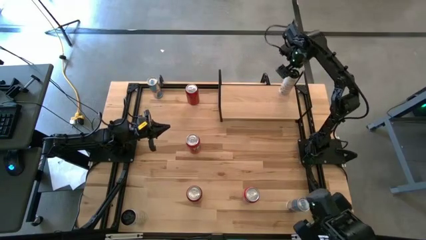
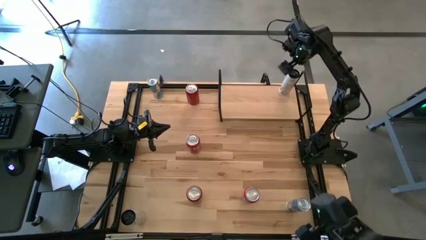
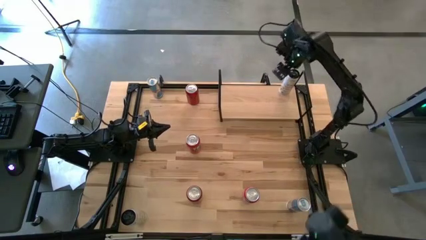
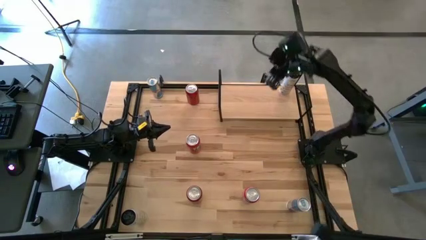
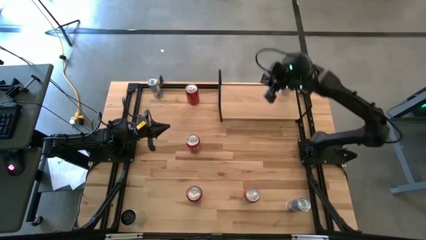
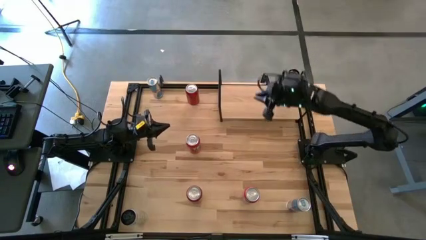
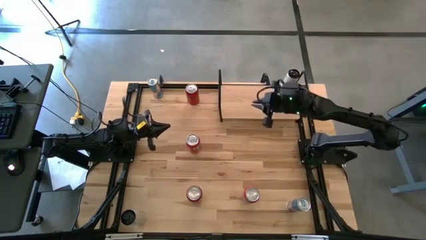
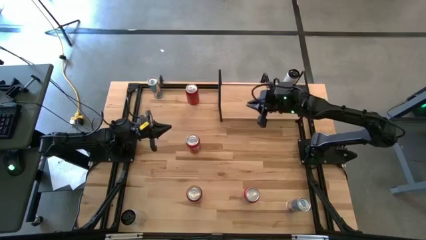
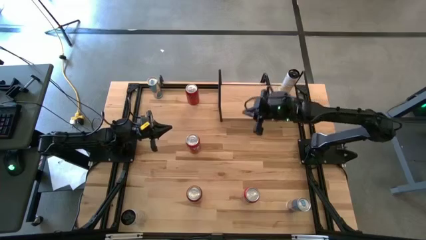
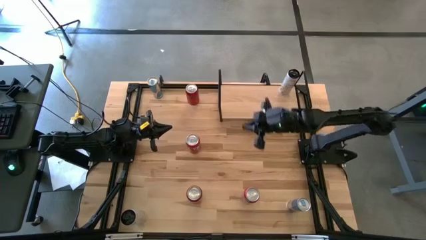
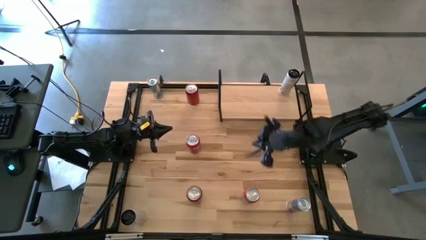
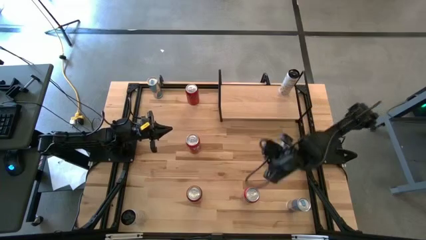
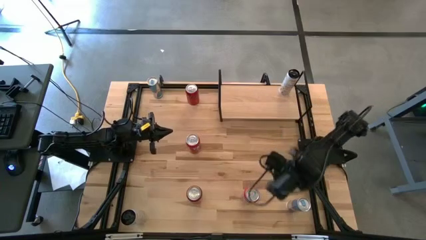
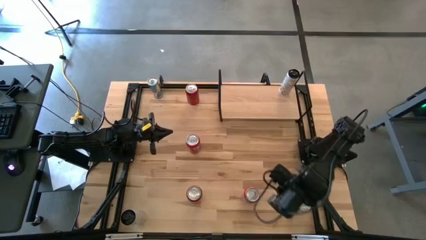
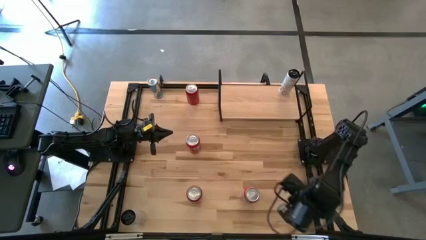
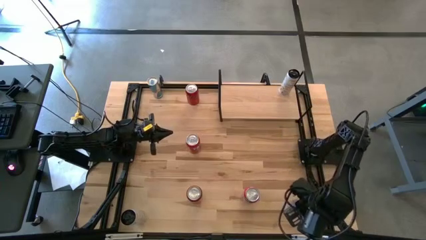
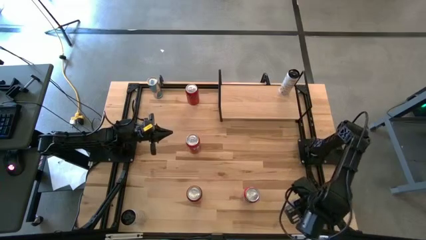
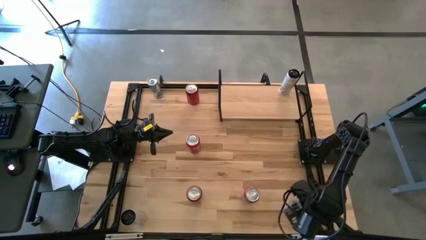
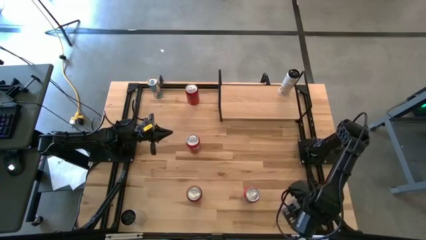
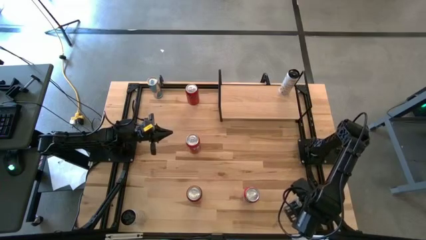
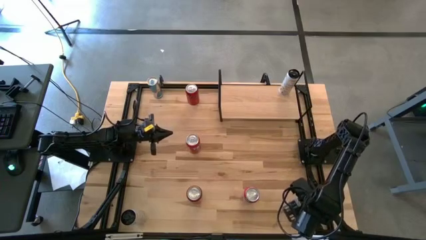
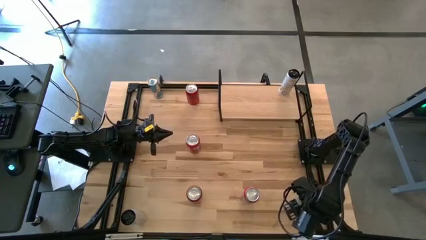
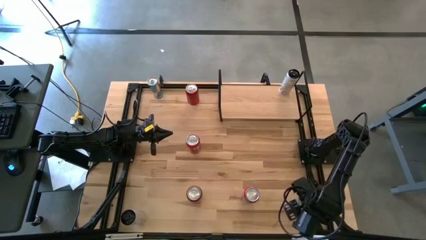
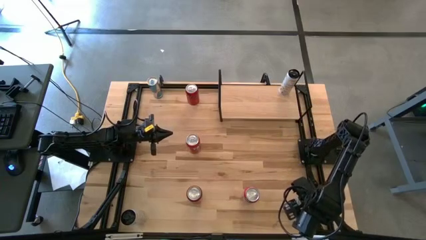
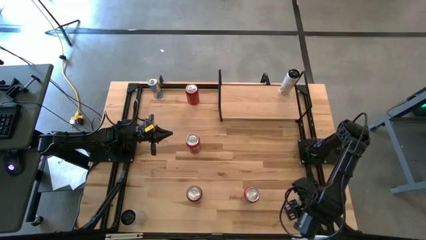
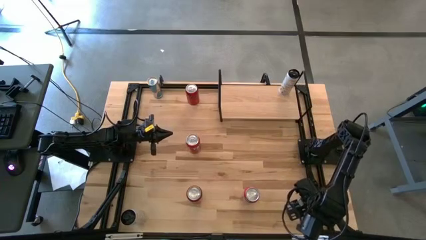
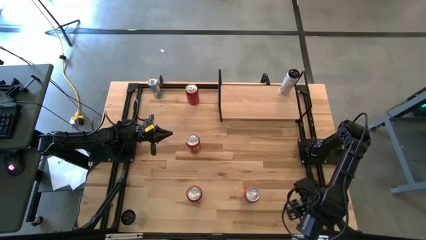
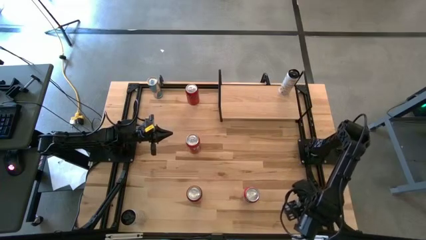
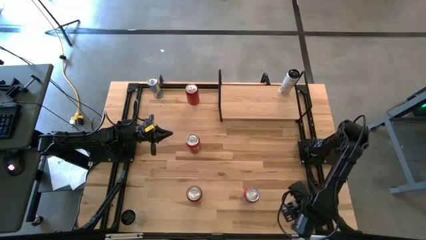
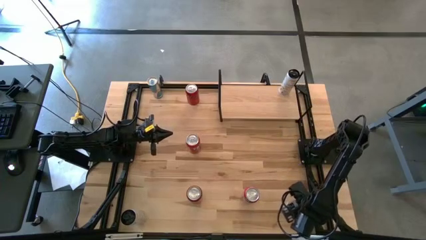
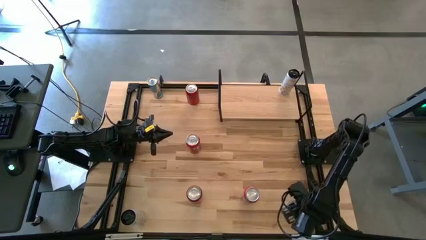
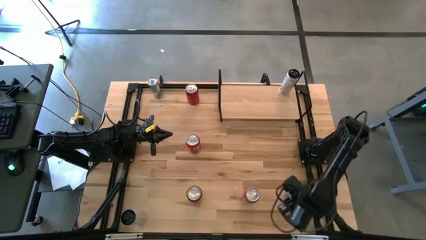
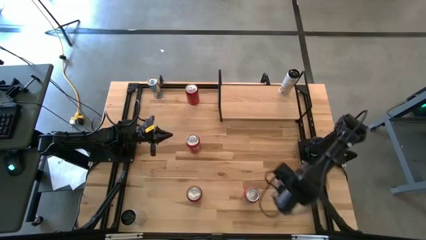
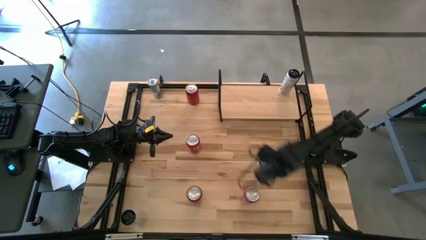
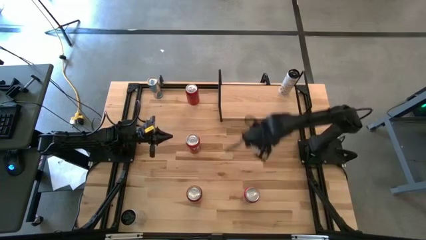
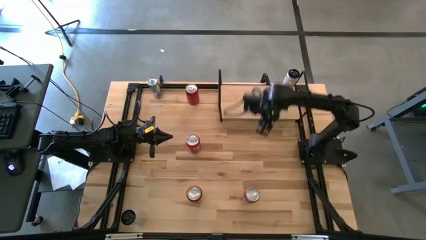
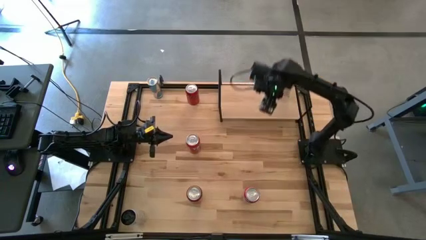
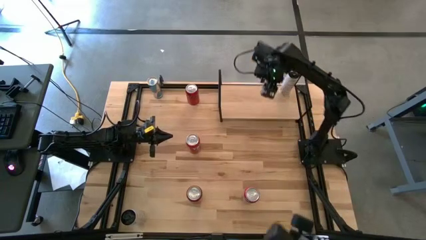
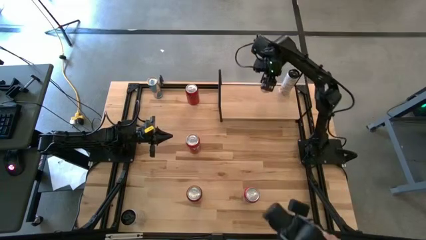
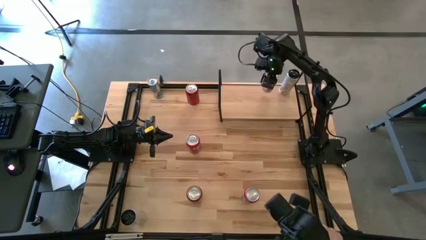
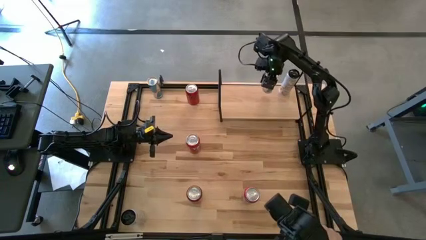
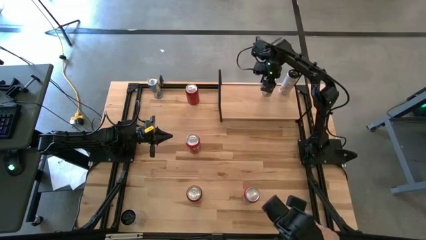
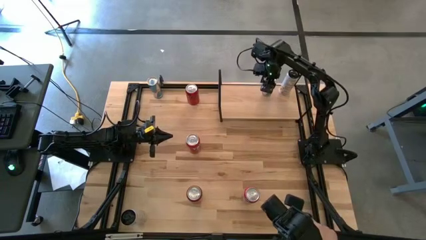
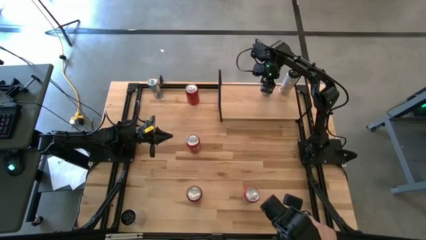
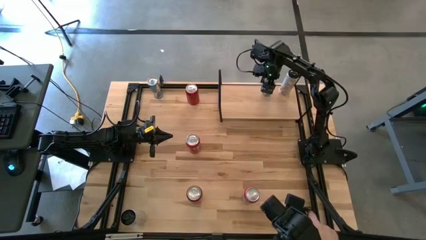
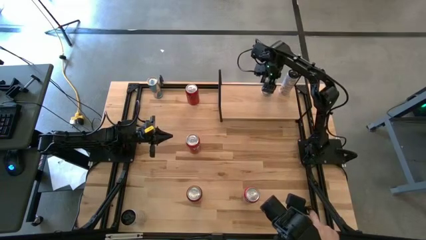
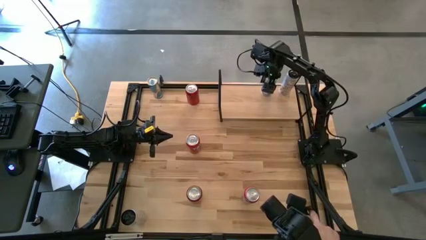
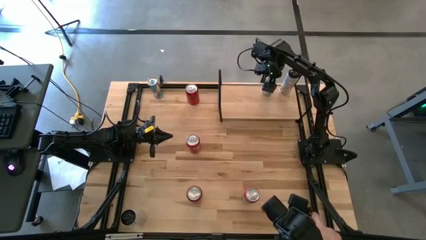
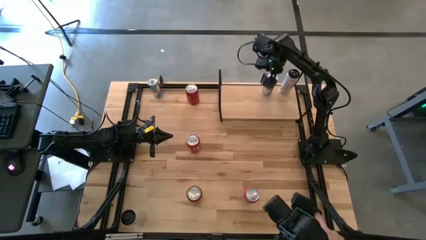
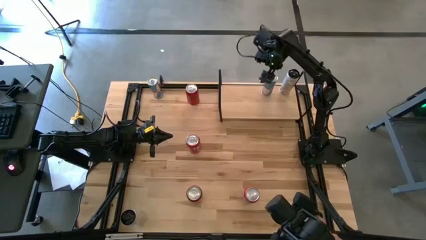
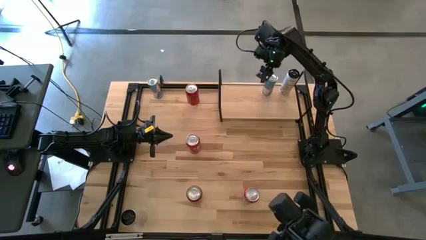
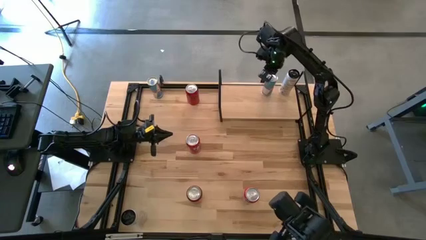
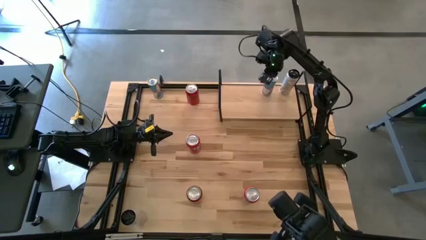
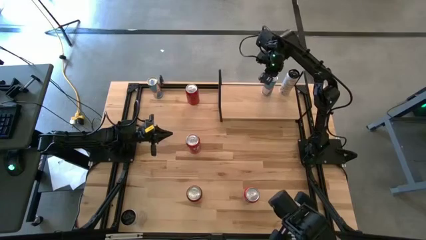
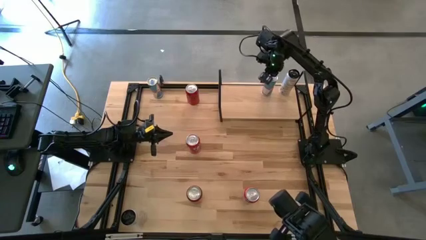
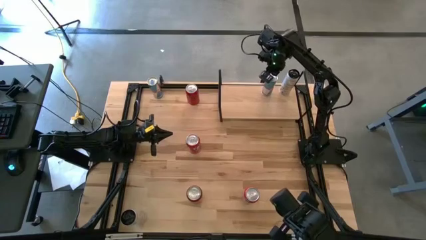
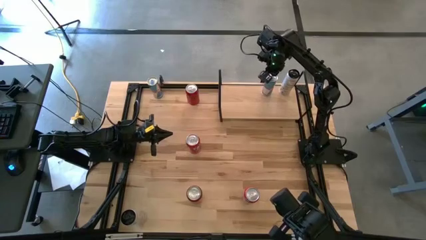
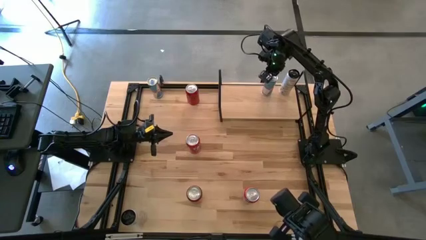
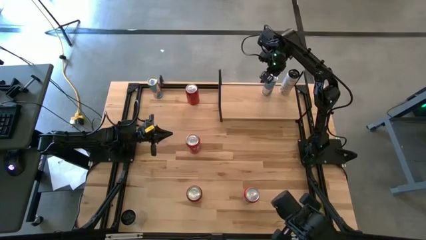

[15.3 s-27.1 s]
Task: Place canned beverage on shelf
Put the bottom blue soda can on the shelf
